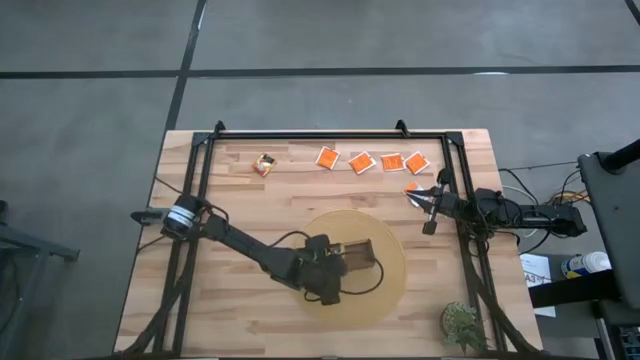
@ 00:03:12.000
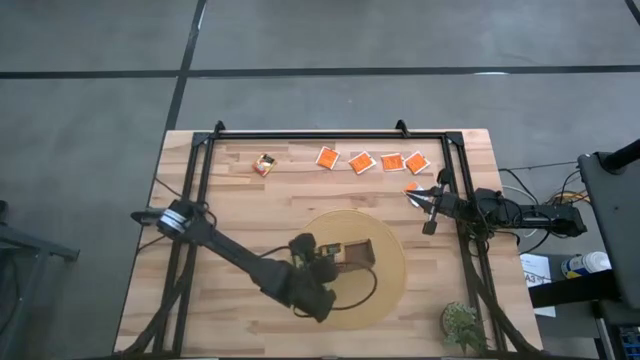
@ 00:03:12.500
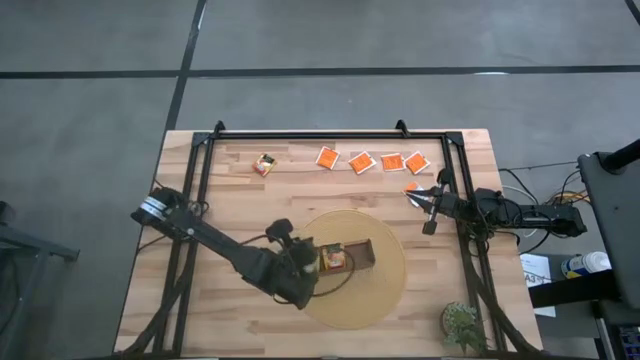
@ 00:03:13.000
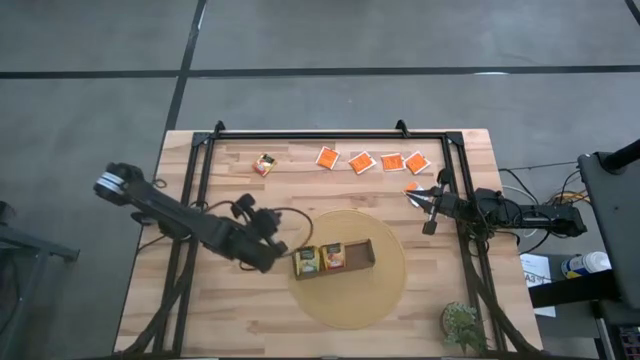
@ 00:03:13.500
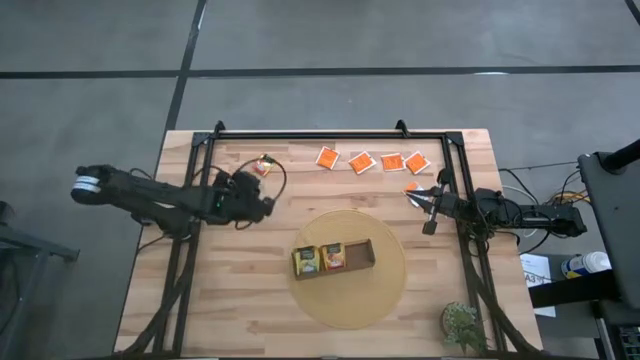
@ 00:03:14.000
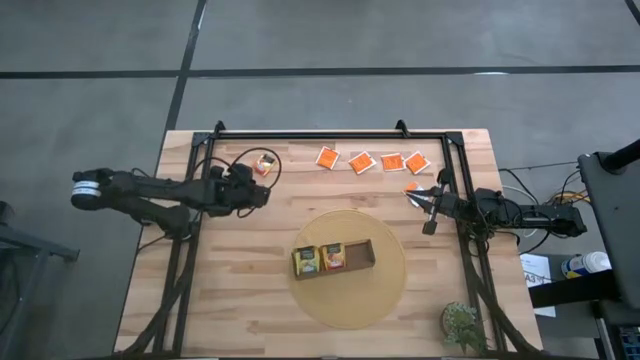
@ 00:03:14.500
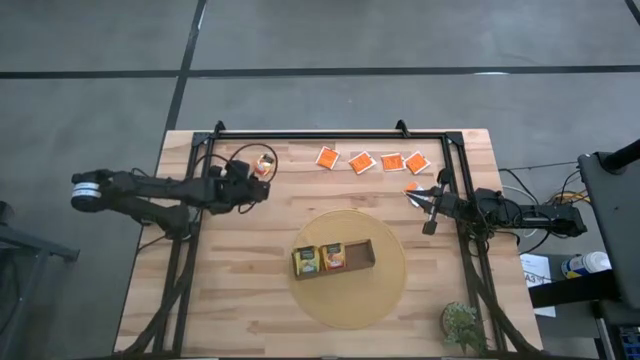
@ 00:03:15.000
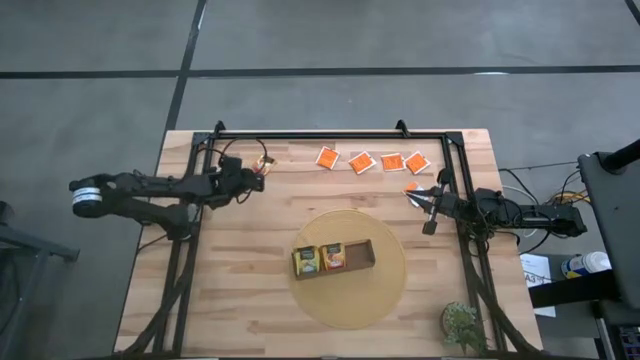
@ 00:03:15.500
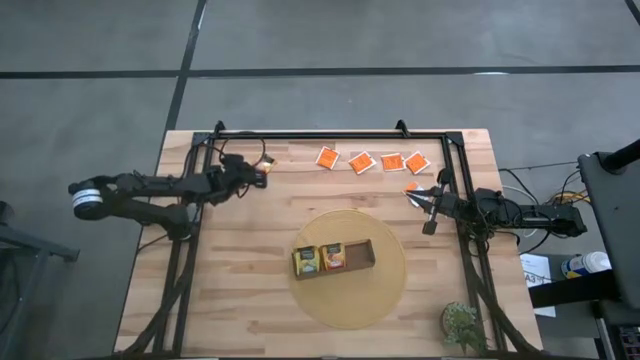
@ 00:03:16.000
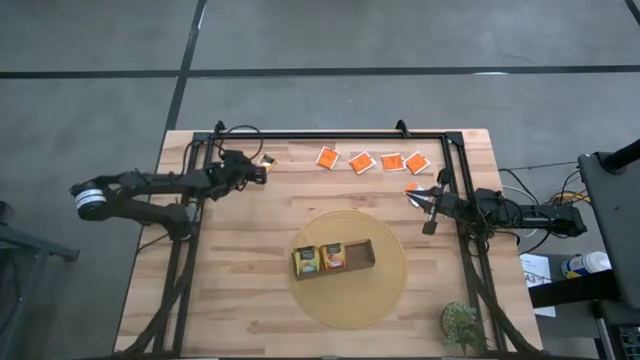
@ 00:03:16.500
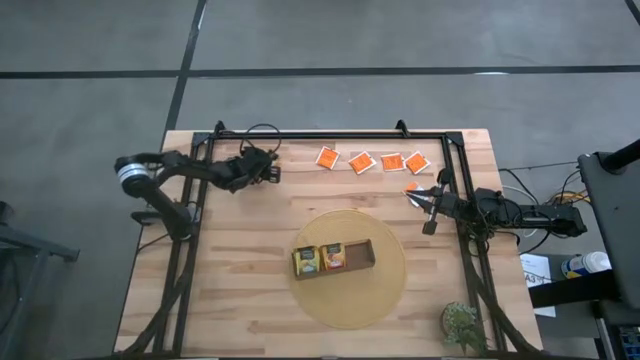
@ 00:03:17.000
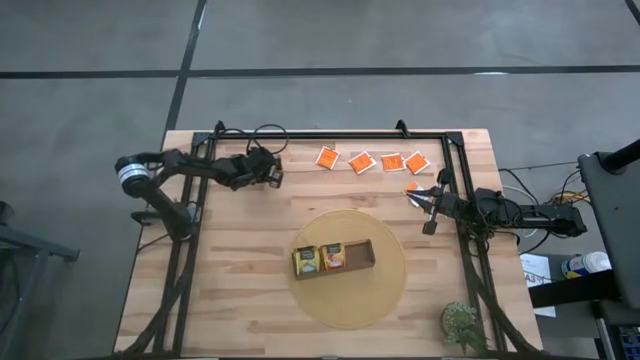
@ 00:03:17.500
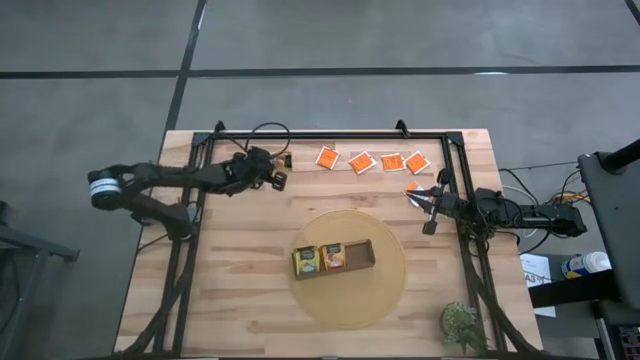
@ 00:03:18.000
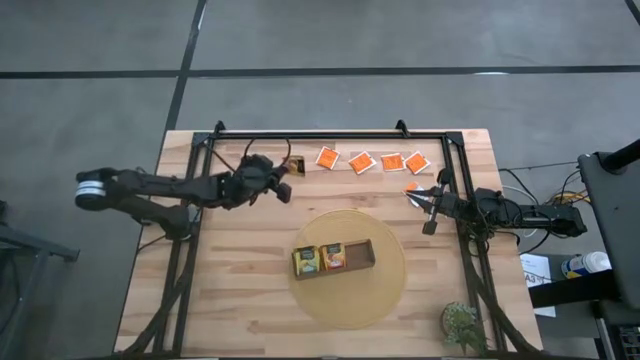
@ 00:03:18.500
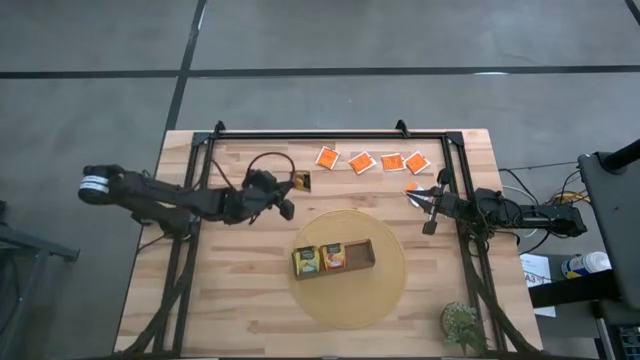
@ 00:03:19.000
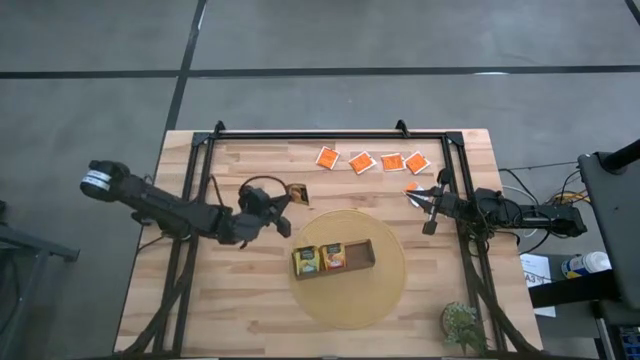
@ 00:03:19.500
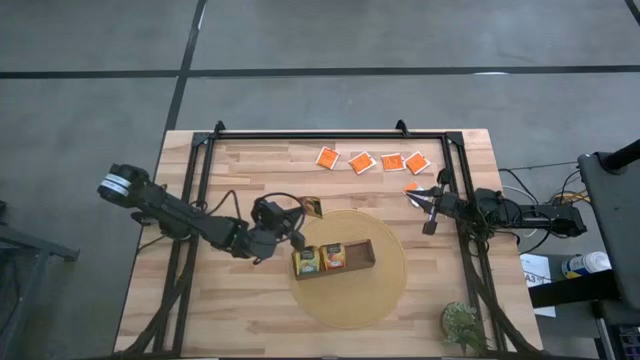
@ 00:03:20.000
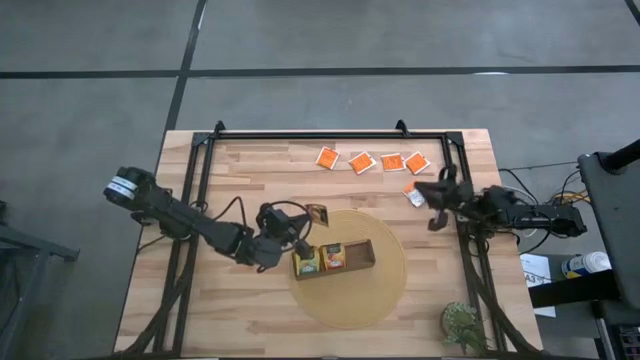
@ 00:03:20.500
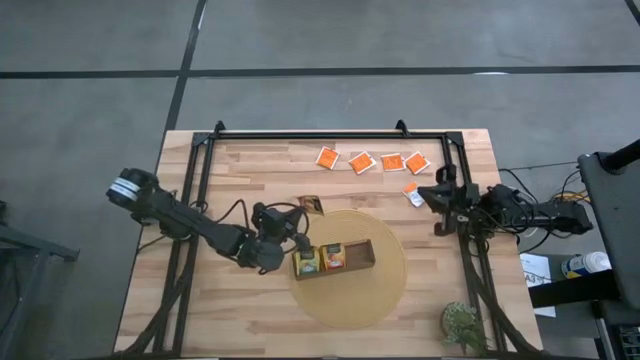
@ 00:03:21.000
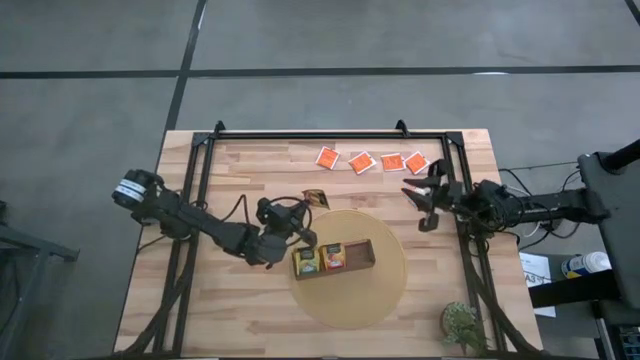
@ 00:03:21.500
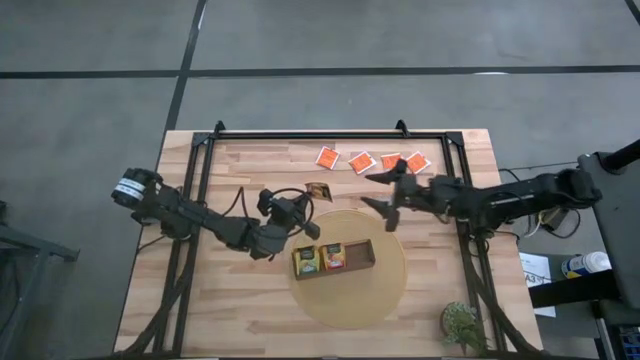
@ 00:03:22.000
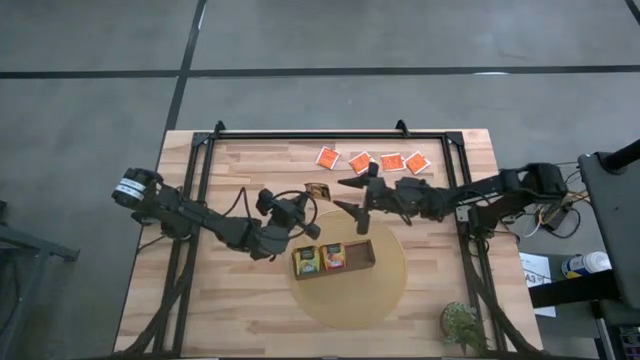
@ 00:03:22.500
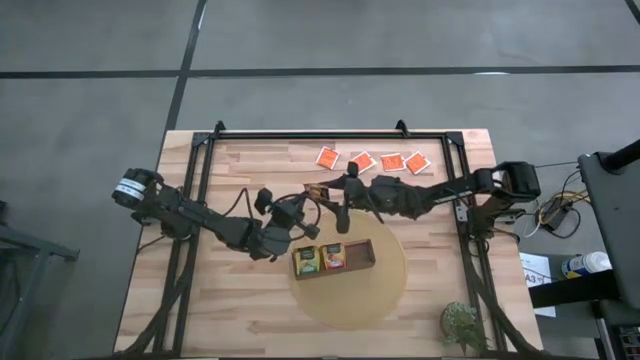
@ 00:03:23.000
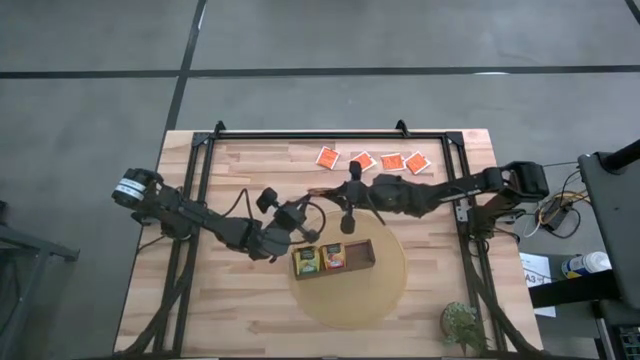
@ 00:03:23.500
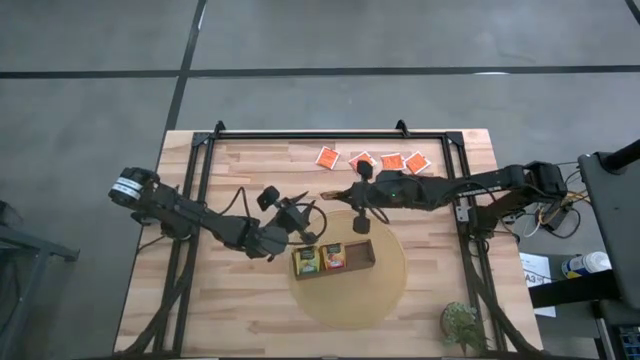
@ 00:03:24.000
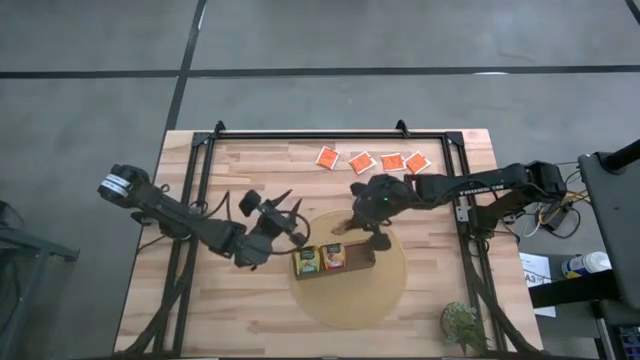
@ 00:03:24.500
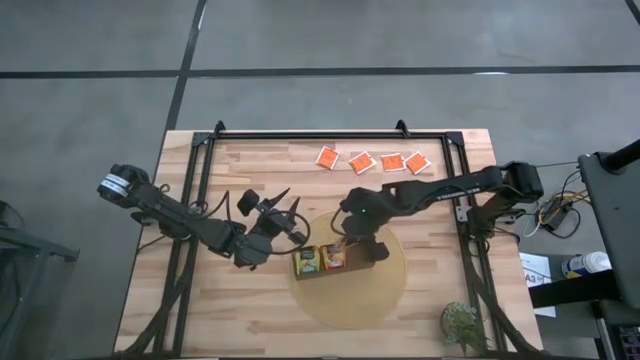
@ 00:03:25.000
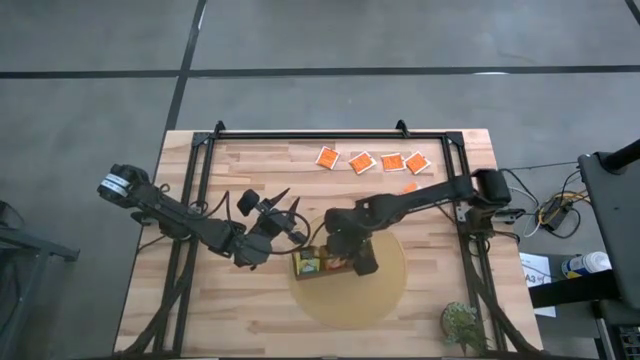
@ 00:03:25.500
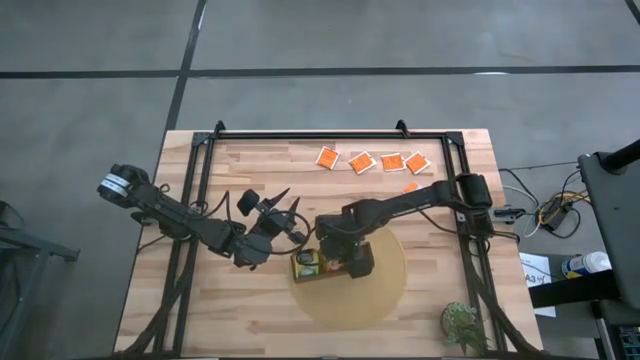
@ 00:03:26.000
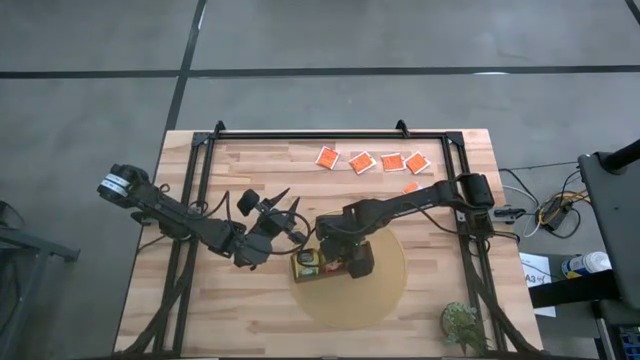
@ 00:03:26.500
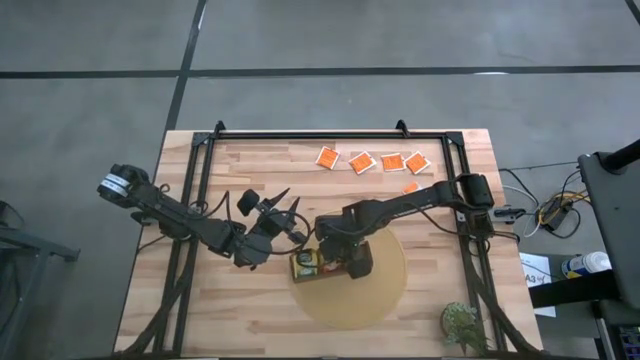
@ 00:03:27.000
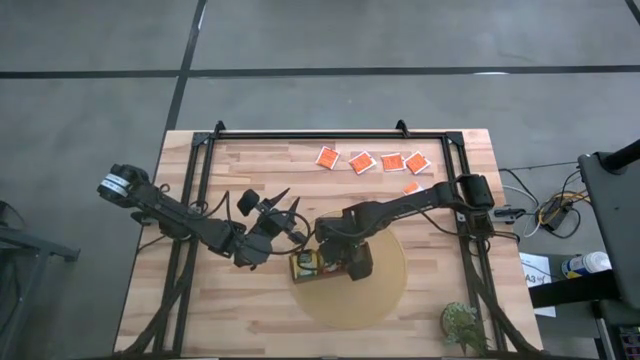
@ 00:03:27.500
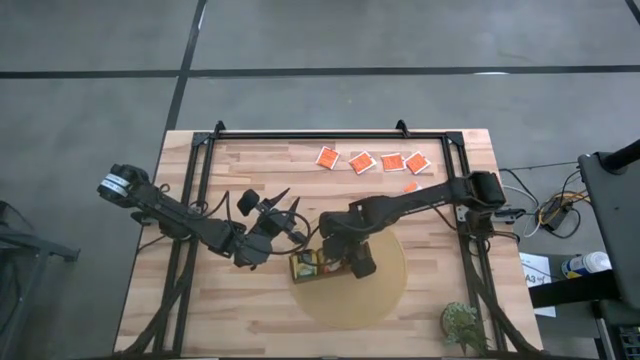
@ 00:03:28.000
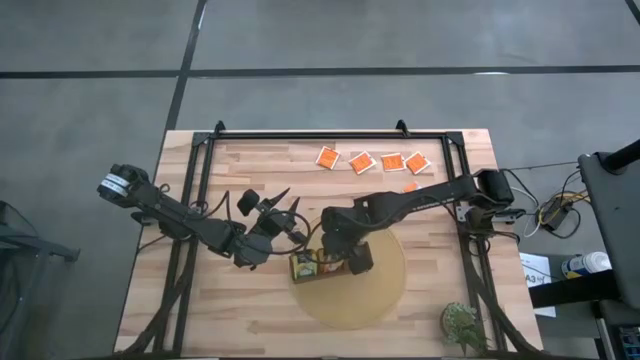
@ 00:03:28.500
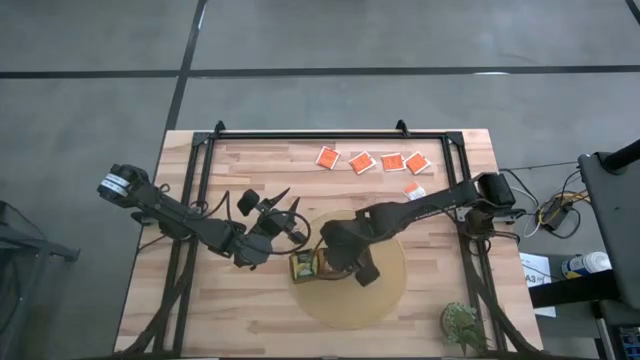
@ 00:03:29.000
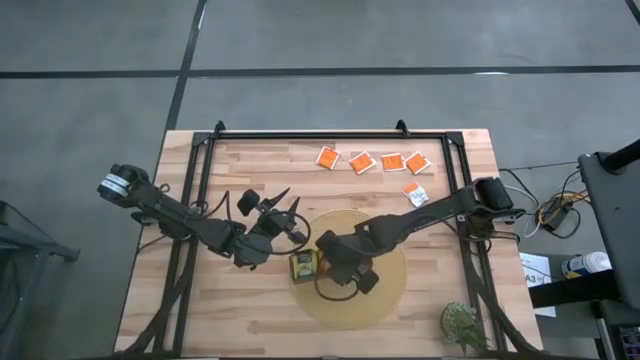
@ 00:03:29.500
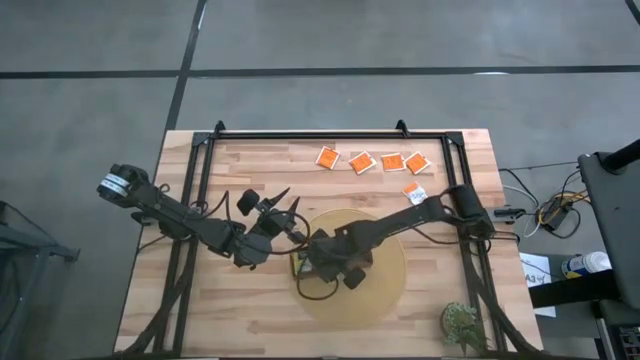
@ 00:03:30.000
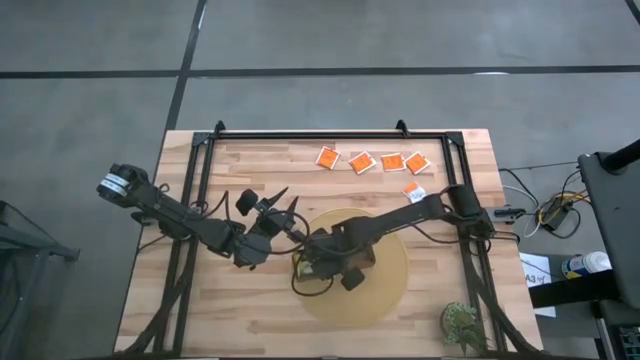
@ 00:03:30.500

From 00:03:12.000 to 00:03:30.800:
Task: Pick & Place Tea
Put the yellow tea bag into the middle section of the wooden organizer

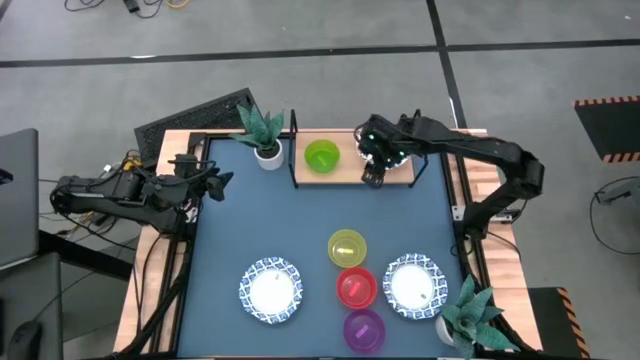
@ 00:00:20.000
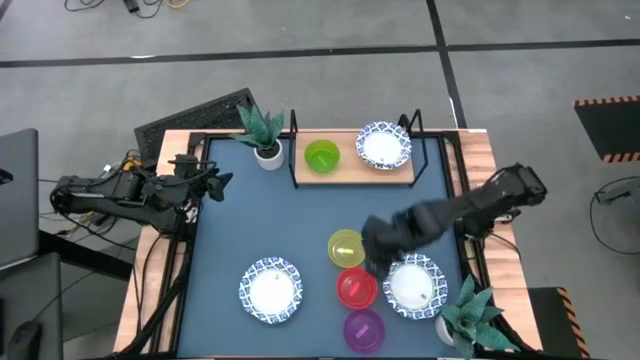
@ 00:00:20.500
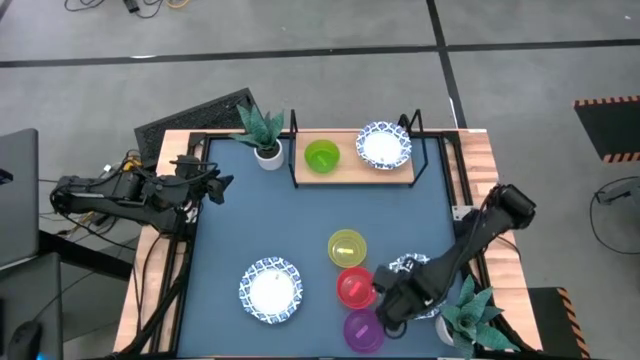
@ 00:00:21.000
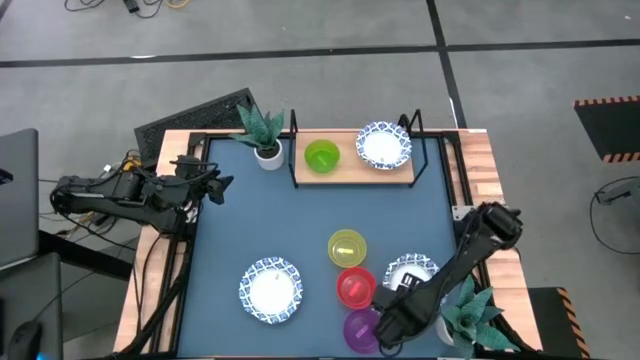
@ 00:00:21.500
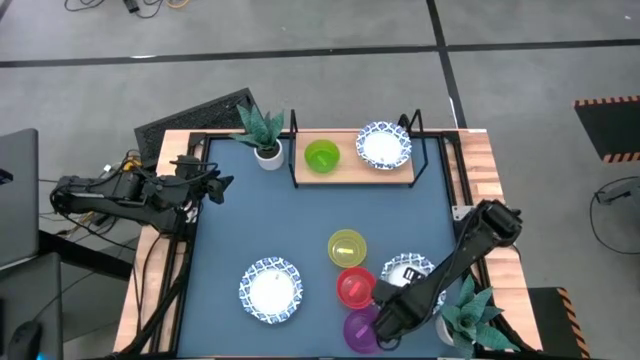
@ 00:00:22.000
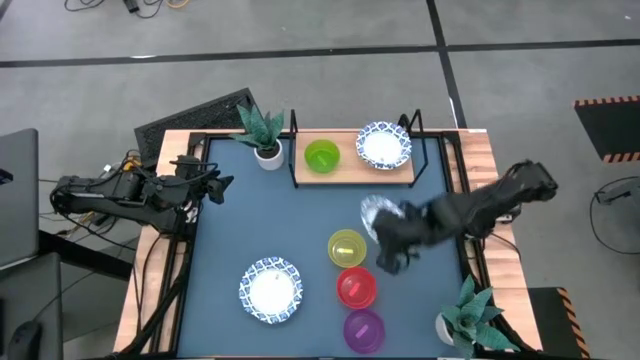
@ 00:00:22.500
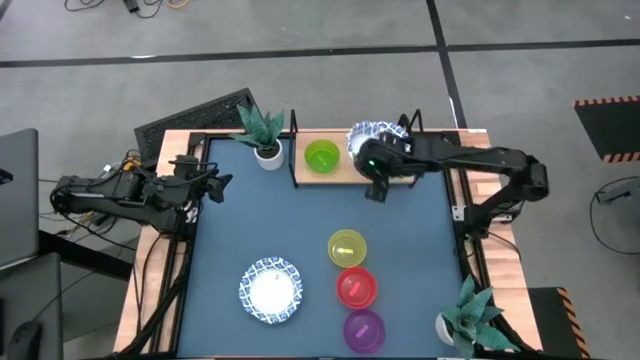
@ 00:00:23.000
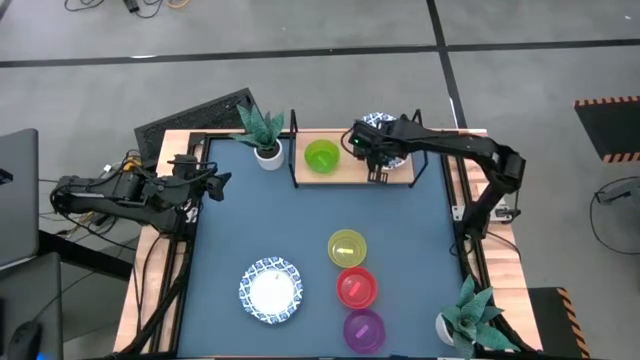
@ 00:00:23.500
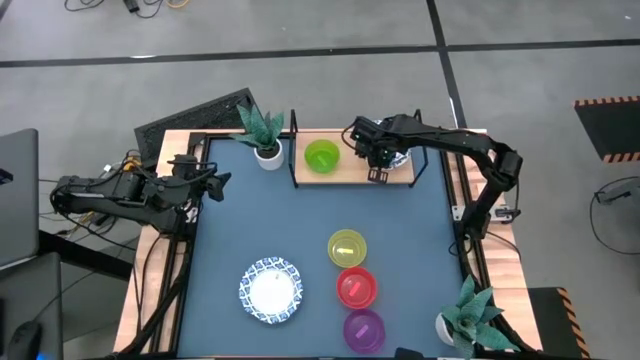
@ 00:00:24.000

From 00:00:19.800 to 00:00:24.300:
Task: Place and stack bowls onto a shelf
Stack the right white patterned bowl on top of the white patterned bowl on the shelf
